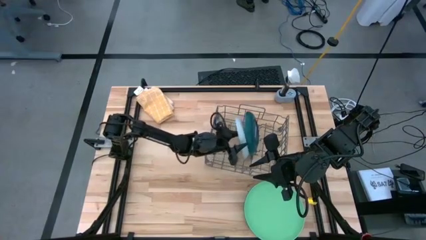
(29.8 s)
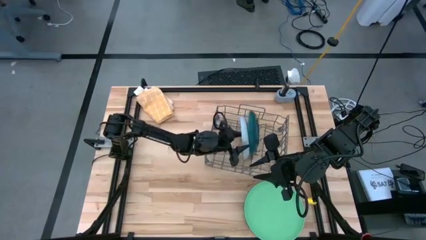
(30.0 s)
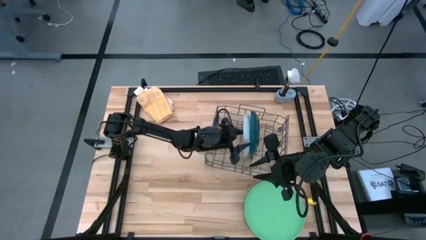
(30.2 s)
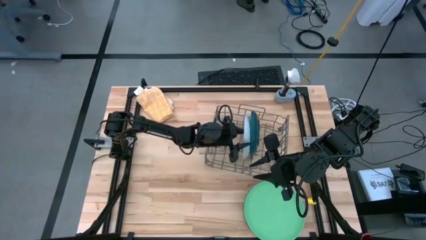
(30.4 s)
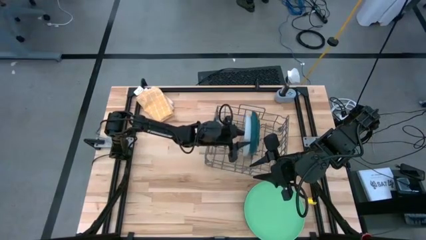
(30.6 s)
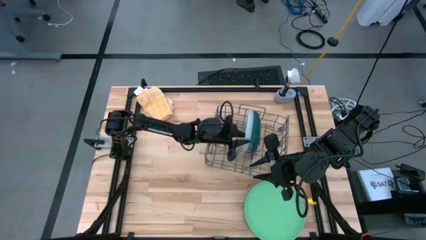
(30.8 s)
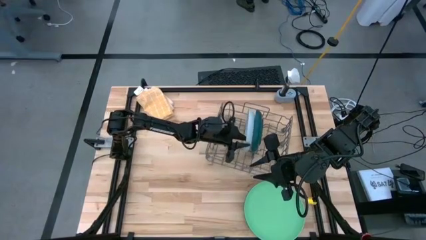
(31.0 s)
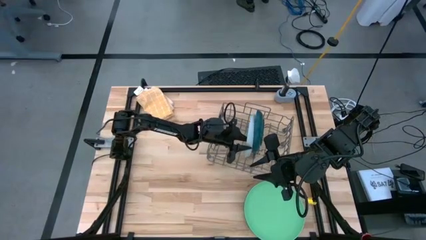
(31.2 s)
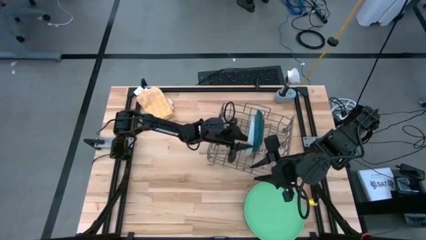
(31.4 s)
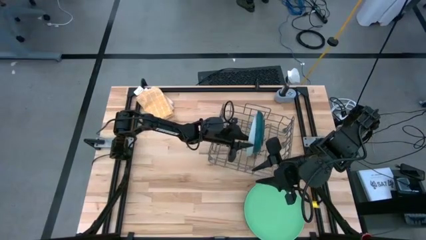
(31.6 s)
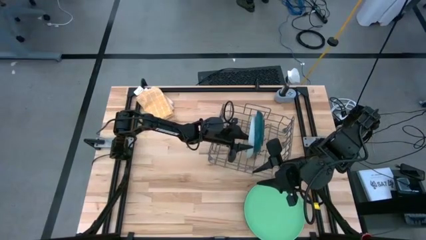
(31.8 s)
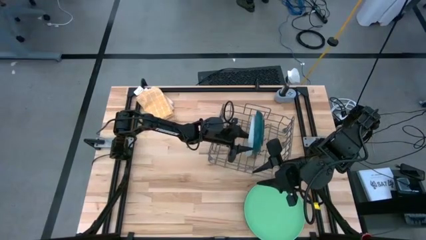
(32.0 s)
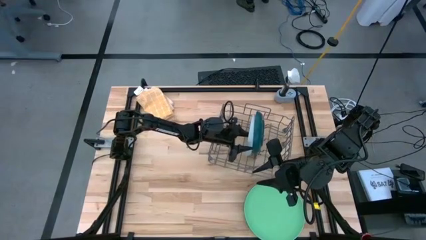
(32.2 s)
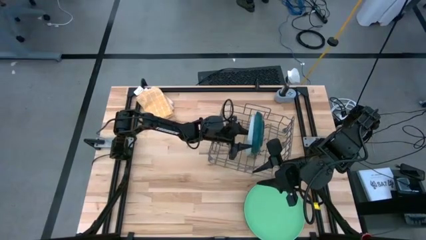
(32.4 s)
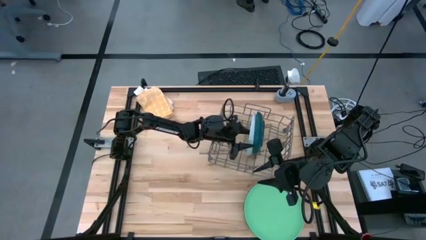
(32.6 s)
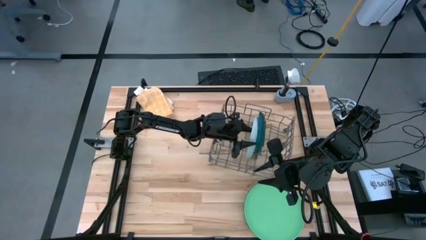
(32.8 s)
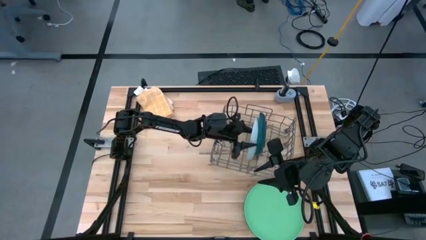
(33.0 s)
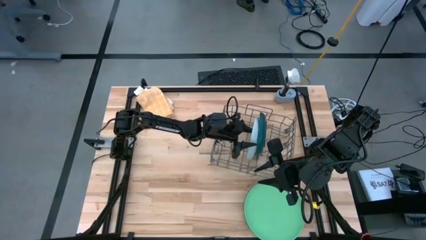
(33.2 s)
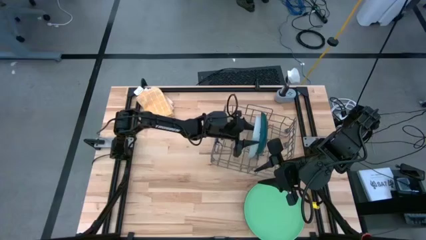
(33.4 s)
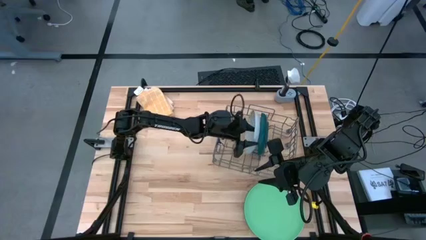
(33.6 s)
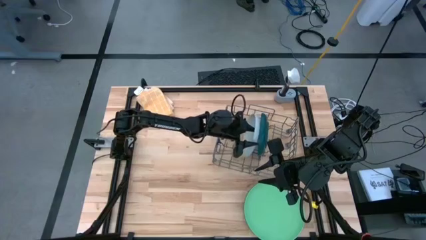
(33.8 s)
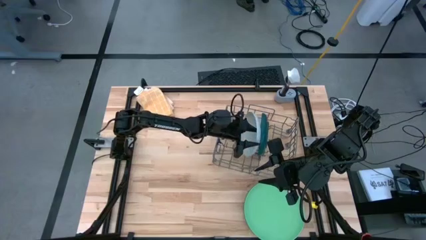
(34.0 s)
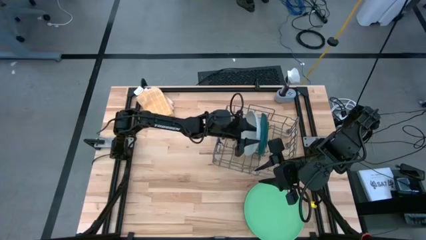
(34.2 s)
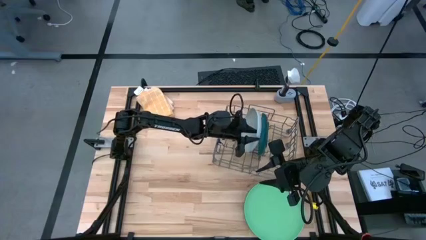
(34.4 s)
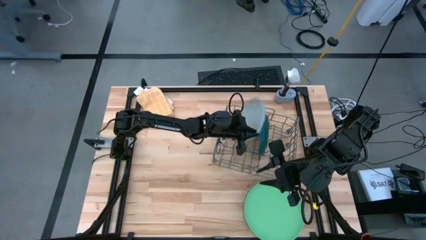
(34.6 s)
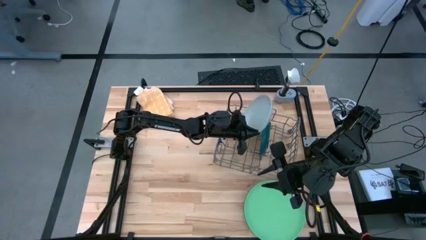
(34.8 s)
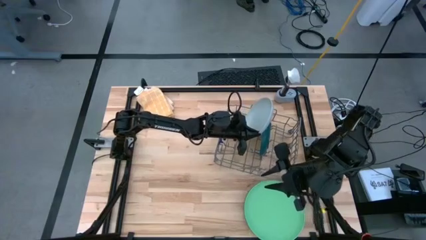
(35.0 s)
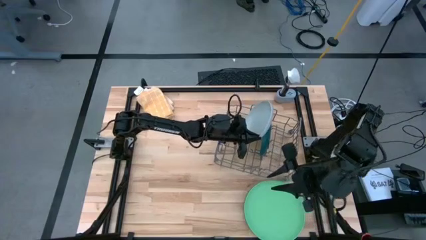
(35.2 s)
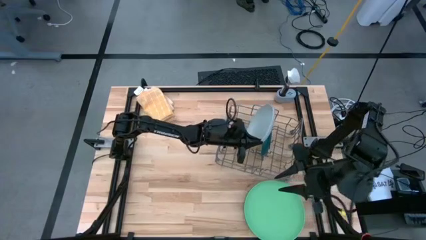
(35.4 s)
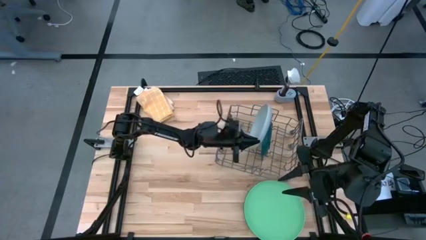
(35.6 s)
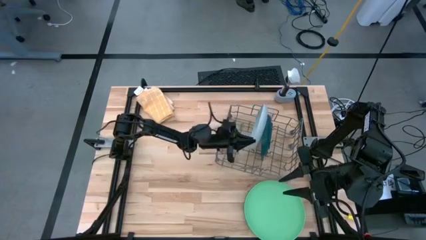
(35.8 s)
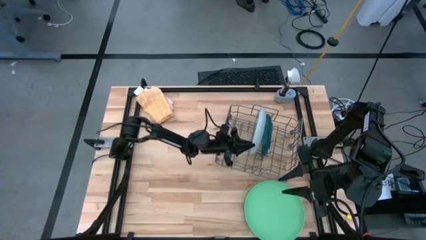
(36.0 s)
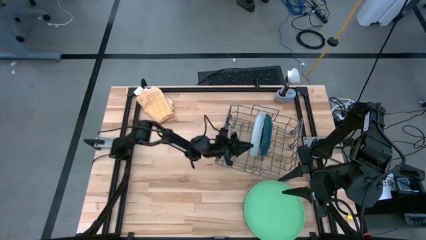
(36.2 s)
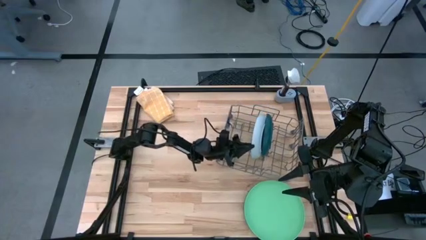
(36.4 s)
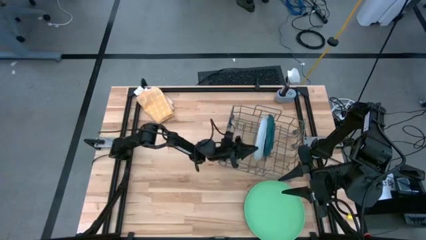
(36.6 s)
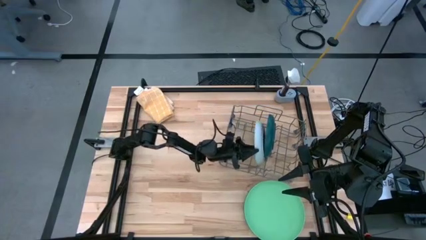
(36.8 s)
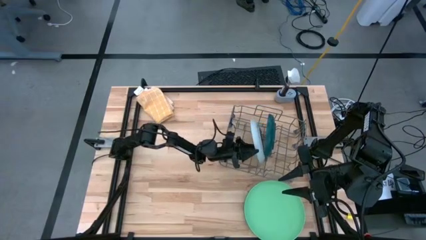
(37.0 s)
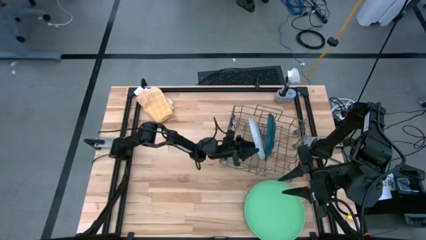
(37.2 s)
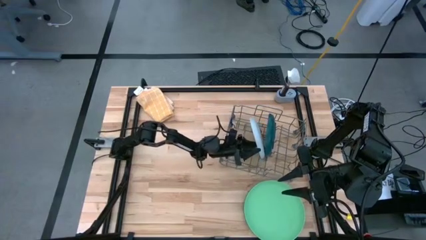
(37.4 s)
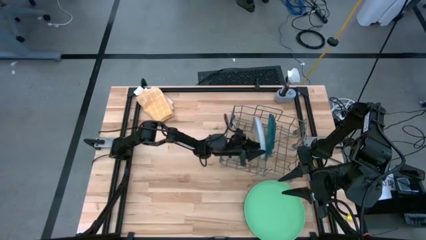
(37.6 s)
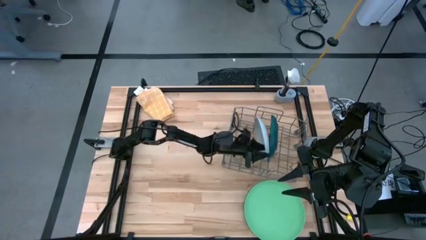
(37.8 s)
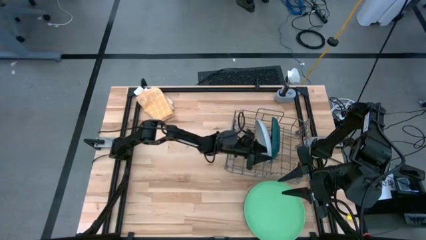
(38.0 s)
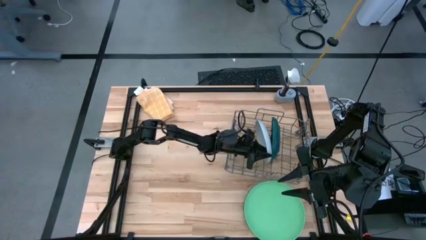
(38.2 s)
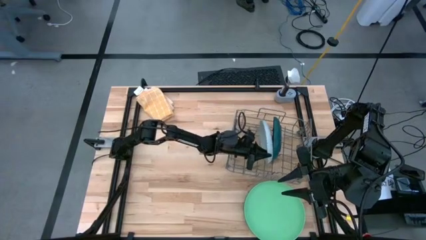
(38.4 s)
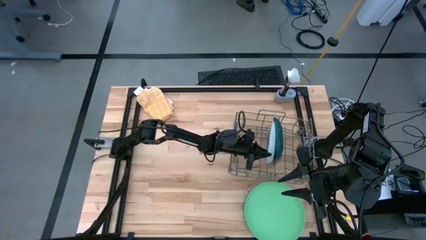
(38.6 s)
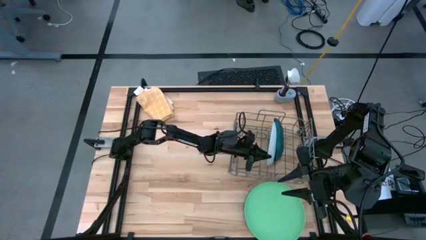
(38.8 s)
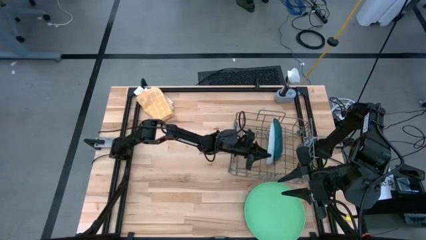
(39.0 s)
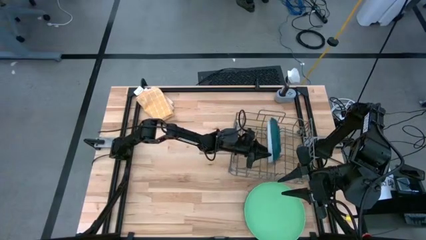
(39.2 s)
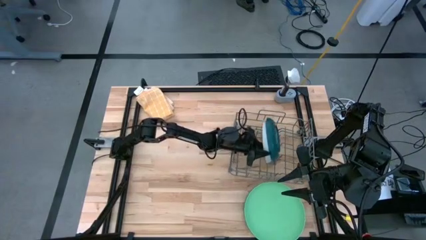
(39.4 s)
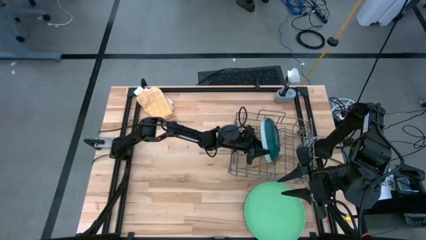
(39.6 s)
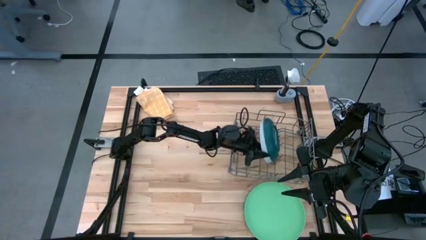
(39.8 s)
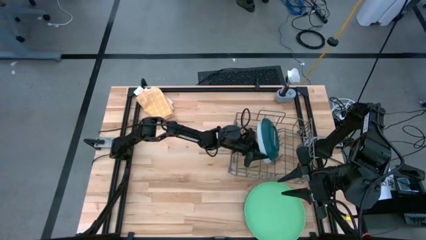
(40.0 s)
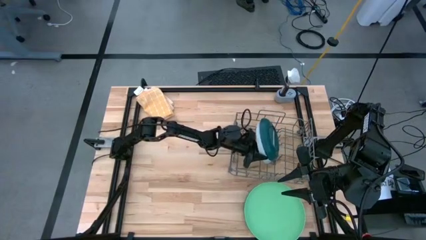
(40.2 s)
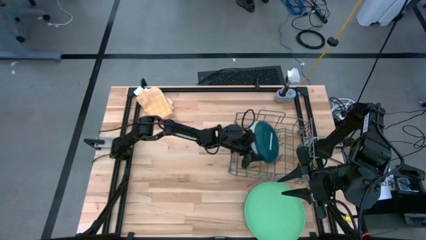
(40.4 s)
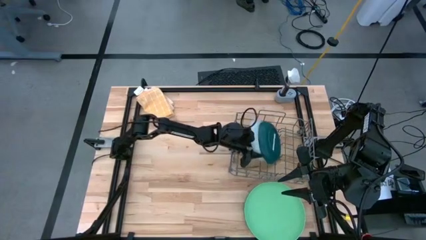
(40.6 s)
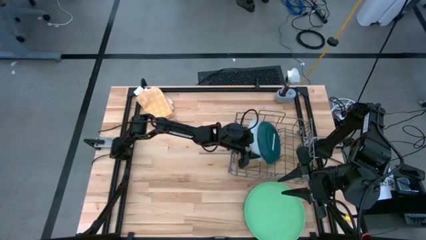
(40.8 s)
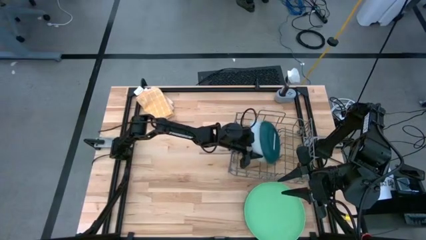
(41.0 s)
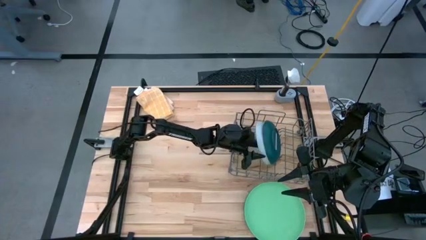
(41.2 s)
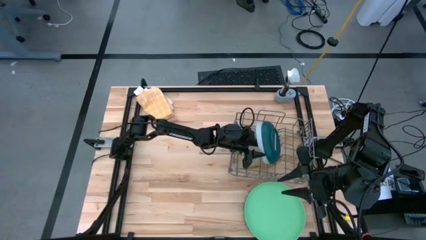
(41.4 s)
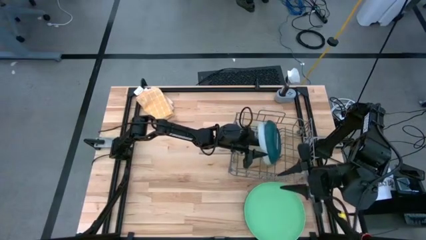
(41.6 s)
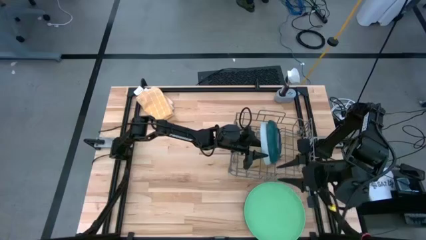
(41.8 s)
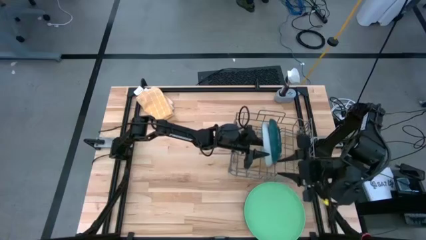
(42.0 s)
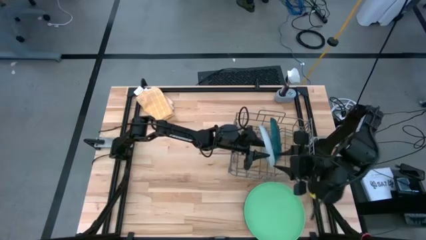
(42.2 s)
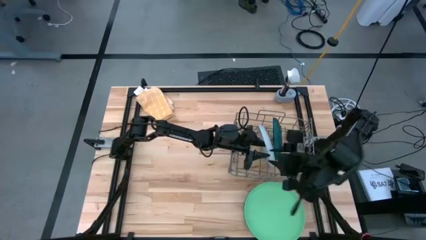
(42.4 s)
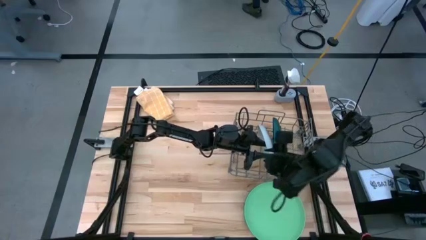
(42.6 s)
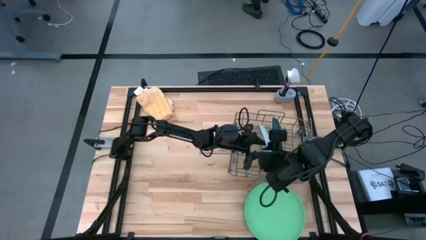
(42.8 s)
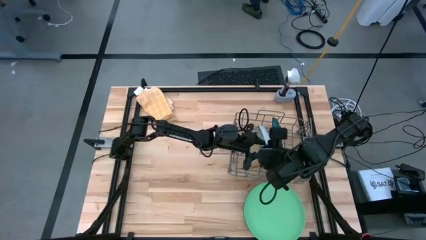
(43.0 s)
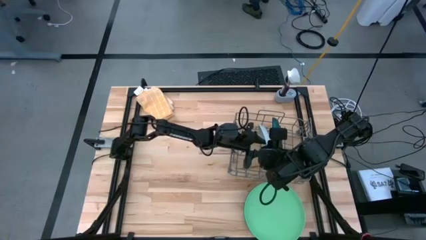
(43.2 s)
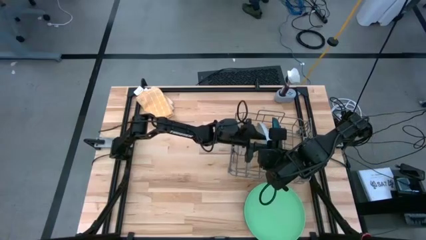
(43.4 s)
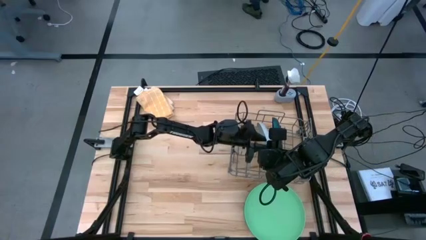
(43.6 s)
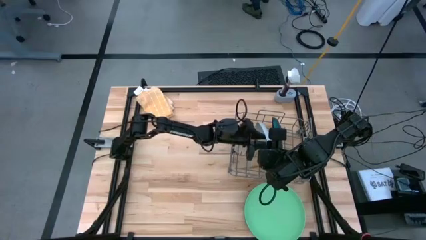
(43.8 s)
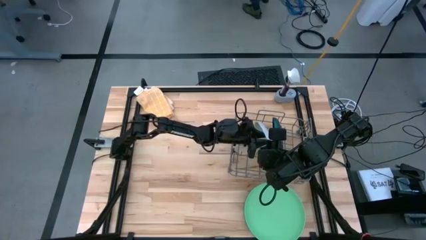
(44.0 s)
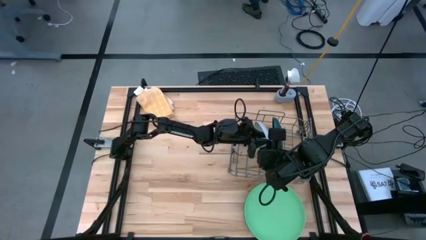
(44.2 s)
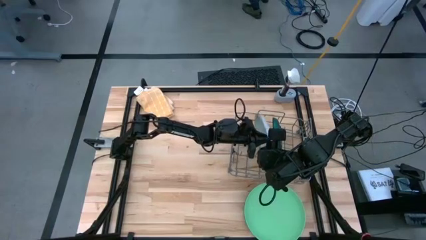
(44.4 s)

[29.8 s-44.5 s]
Task: Sort dishes
Put the white plate in the dish rack

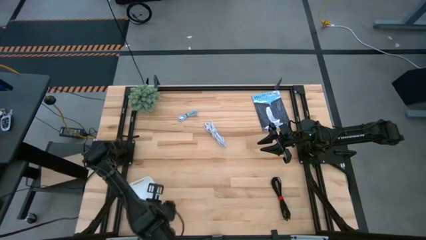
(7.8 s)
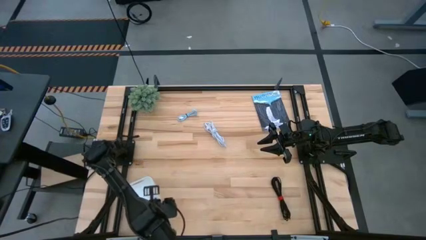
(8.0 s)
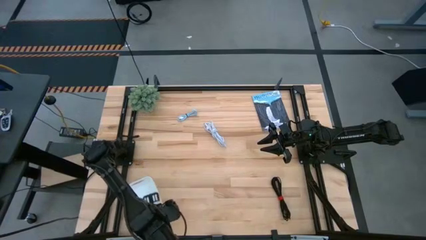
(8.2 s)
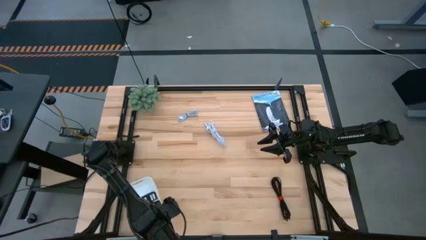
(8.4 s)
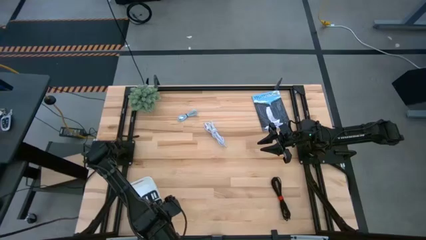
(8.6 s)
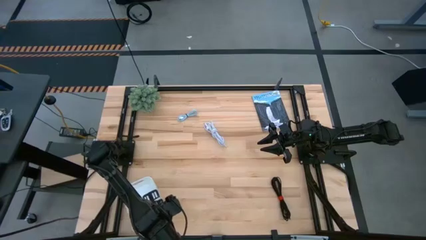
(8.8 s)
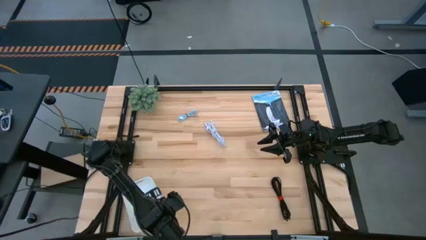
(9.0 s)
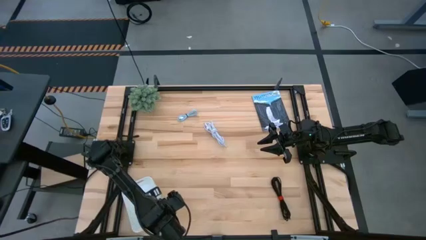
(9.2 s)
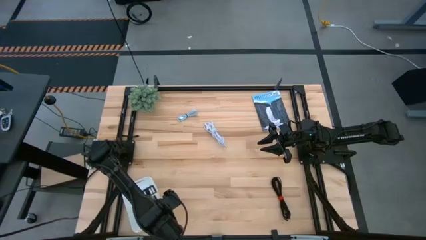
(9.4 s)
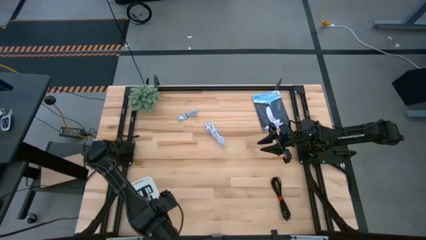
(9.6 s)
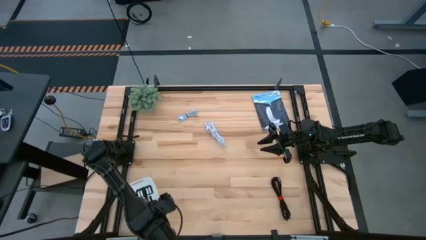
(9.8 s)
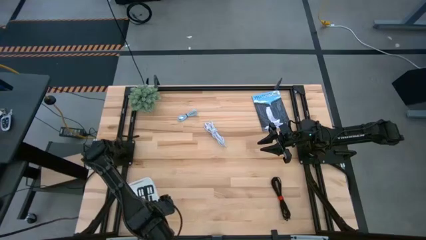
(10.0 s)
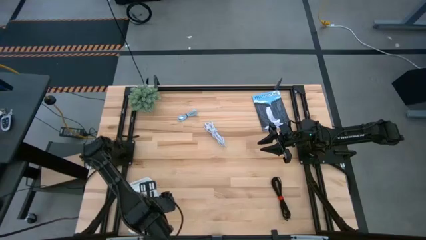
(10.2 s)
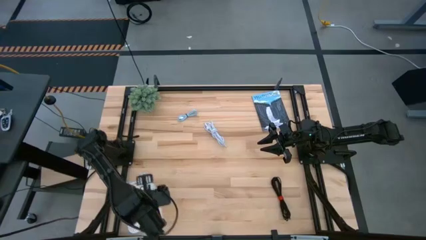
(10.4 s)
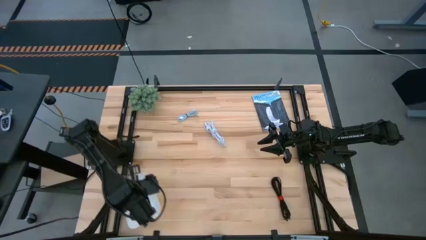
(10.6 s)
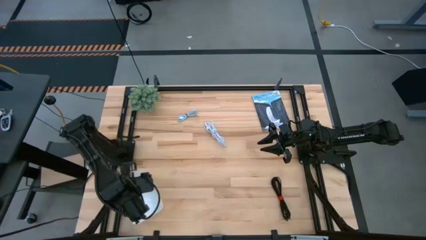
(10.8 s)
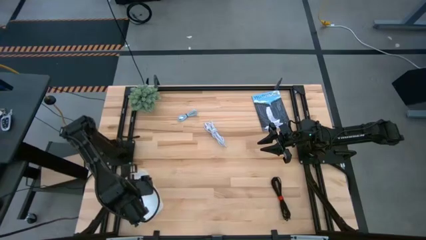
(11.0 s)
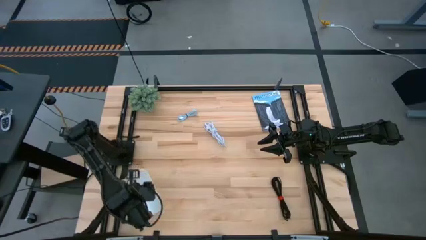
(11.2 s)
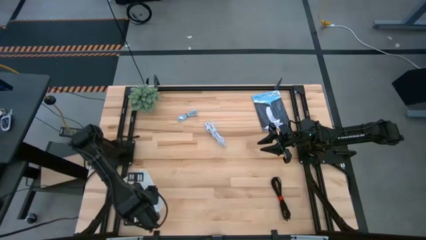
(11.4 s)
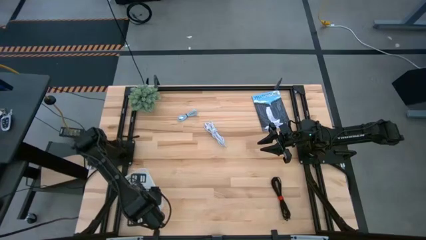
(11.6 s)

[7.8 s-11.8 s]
Task: Pick and place USB-C Cables
Put the left black usb cable into the white bin
